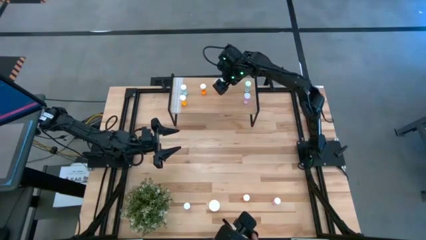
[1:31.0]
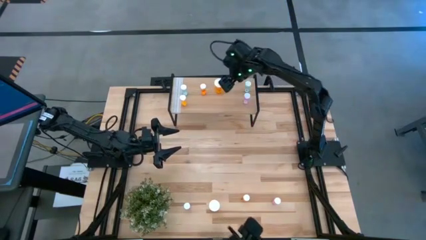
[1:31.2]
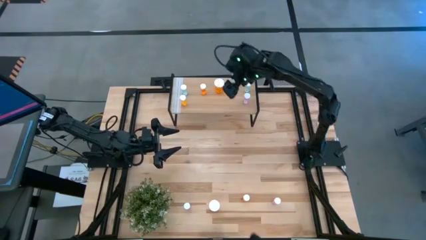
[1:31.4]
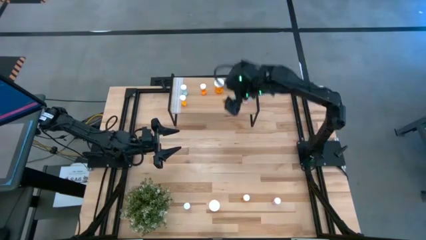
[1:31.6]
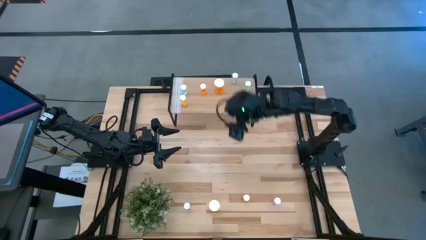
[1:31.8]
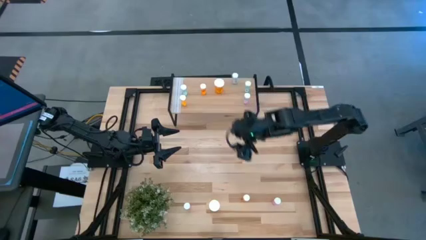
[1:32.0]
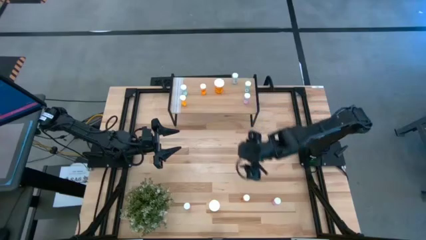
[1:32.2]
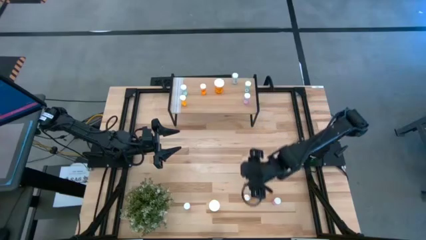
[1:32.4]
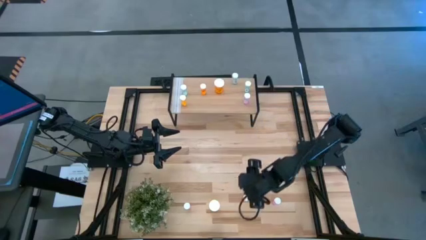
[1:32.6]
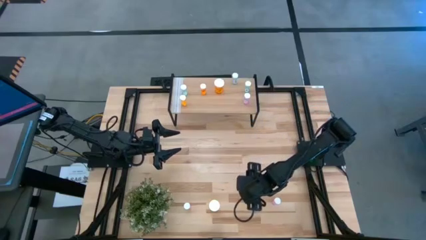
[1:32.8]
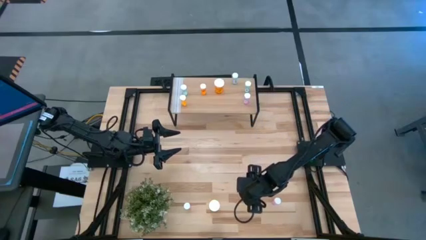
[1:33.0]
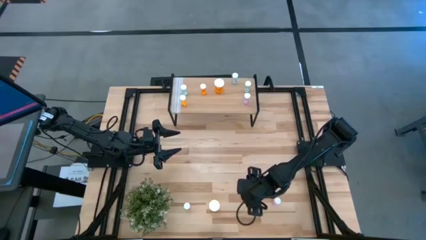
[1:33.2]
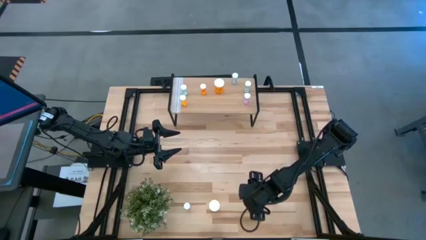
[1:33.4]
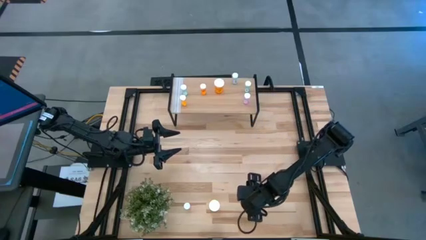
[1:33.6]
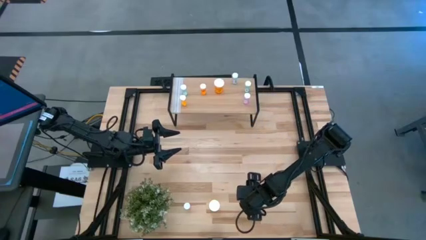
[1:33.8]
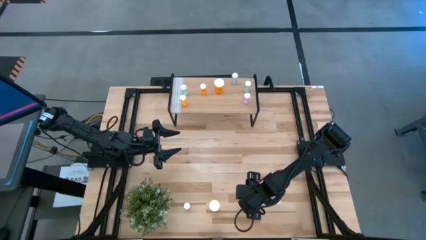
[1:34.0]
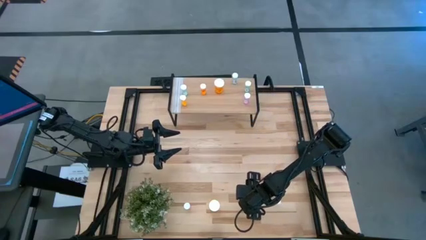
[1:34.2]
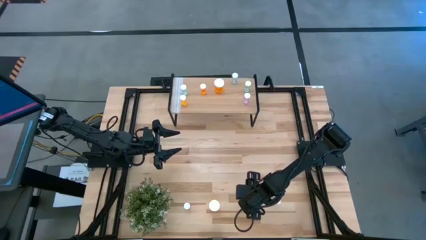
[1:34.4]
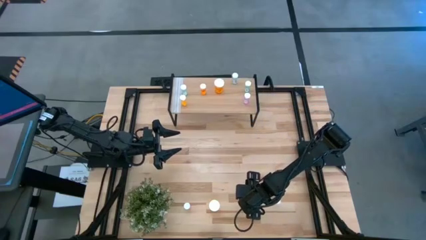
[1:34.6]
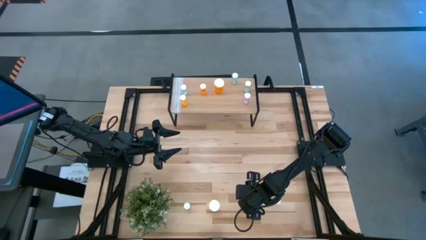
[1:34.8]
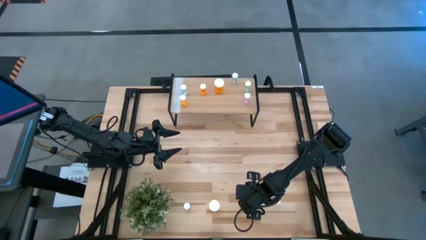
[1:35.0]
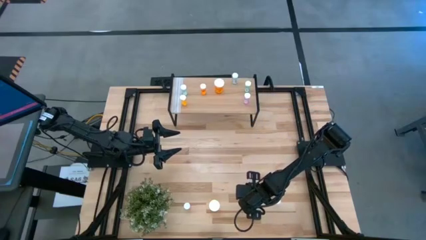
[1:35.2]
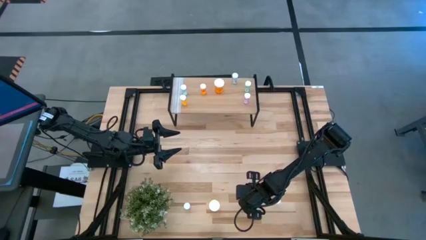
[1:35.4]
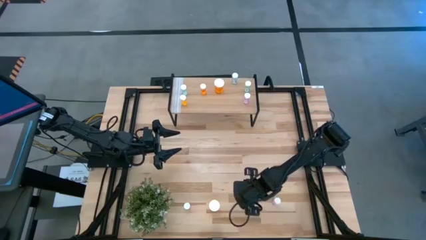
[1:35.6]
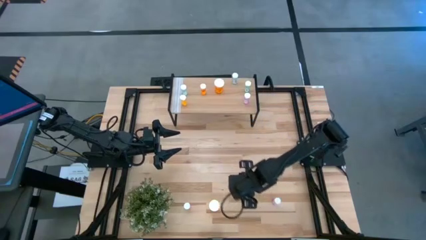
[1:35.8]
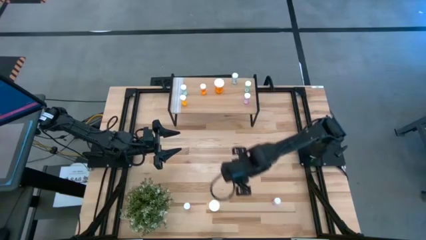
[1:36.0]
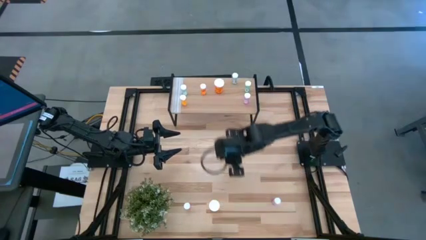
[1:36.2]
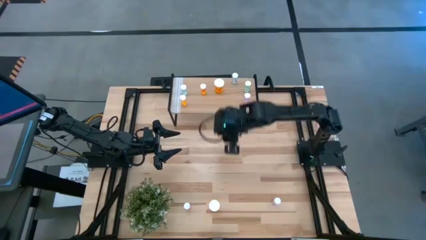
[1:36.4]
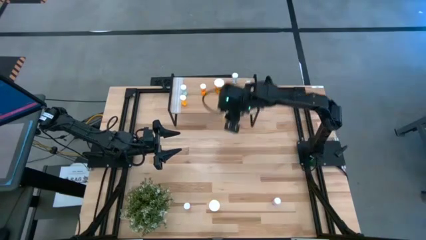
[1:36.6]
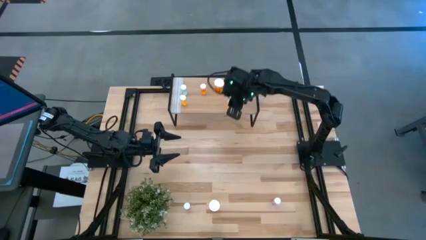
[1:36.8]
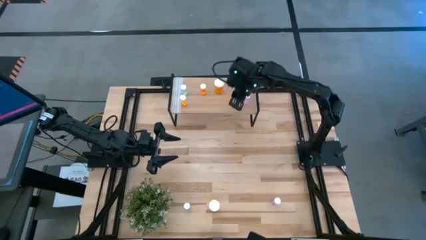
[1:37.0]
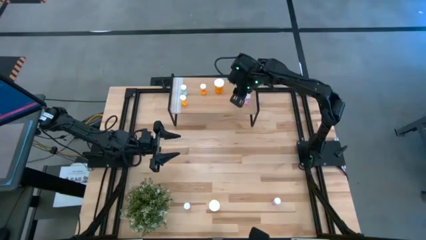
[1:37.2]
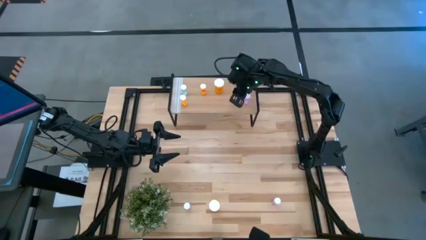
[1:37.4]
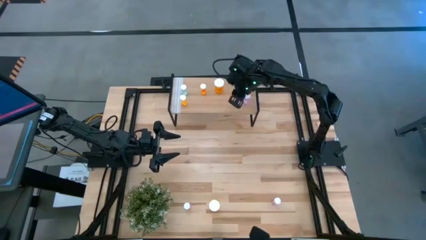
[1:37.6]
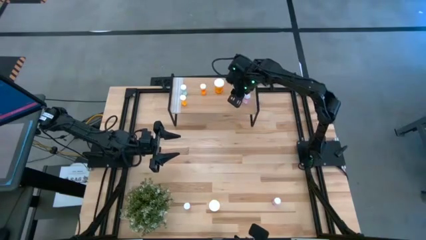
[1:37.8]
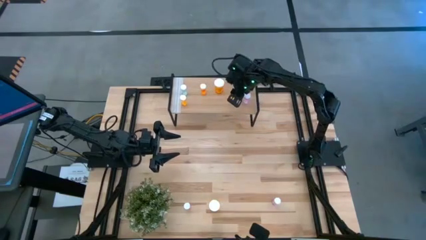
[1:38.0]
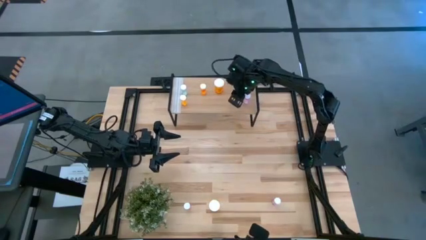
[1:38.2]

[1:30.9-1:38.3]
Task: Pick and place medicine bottles onto shelf by color
Put the small orange bottle on the shelf

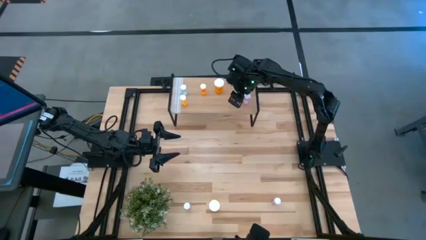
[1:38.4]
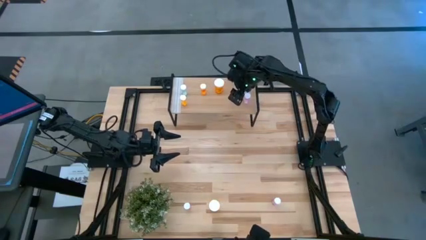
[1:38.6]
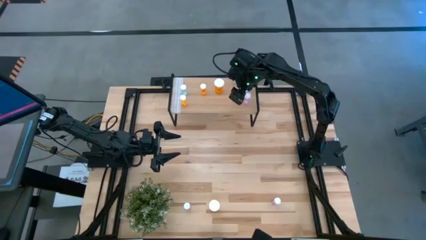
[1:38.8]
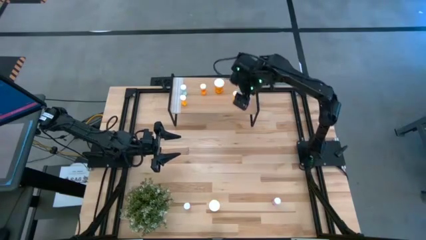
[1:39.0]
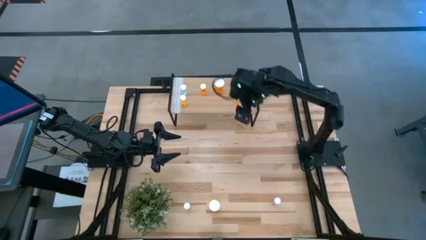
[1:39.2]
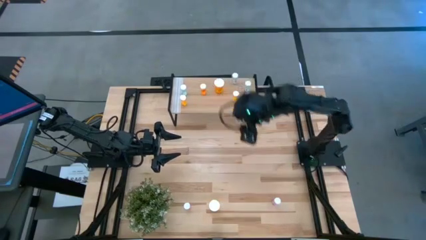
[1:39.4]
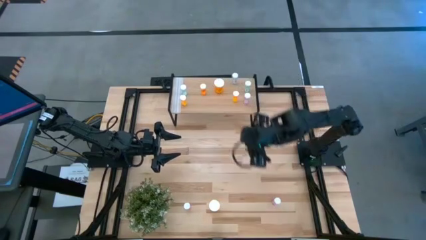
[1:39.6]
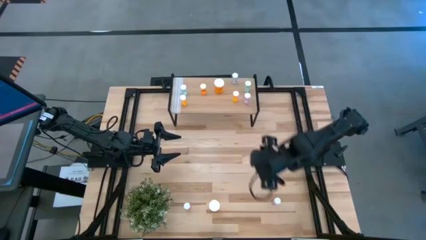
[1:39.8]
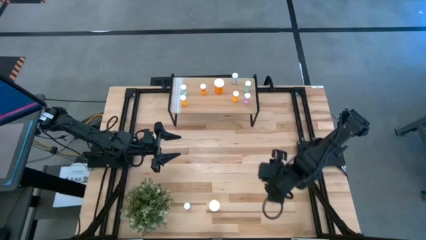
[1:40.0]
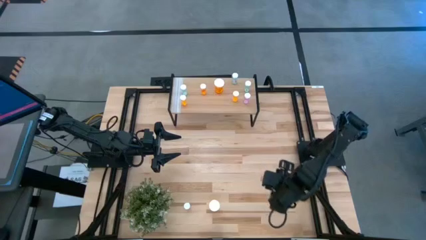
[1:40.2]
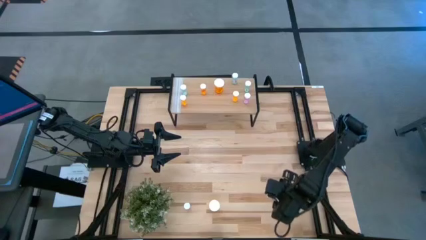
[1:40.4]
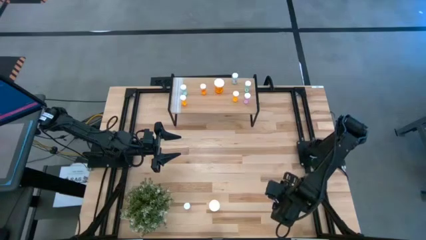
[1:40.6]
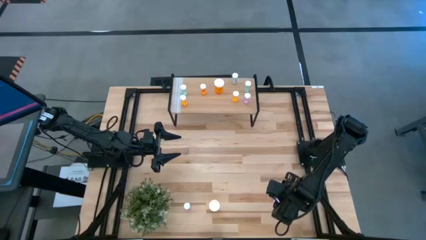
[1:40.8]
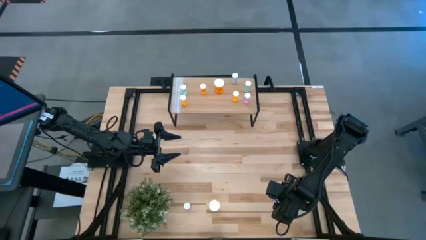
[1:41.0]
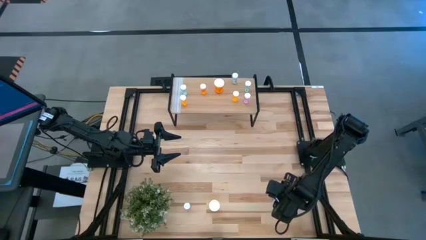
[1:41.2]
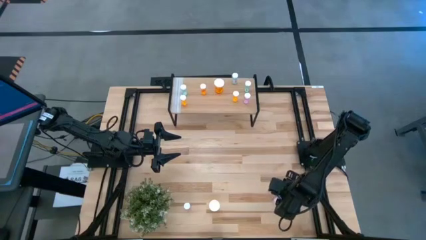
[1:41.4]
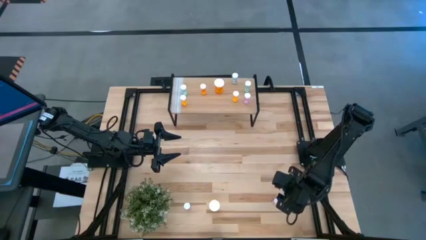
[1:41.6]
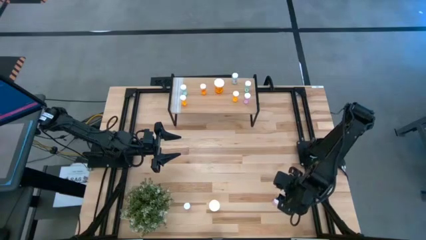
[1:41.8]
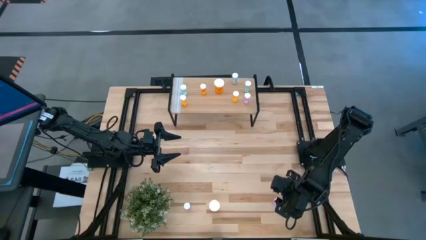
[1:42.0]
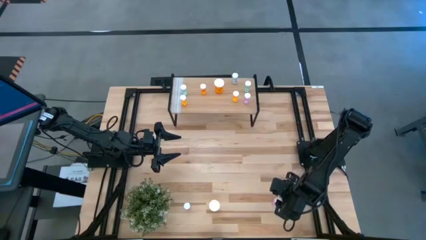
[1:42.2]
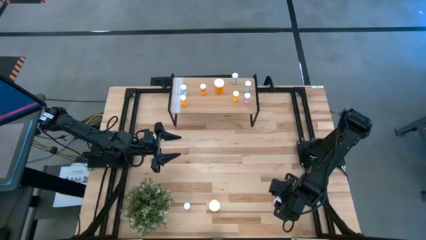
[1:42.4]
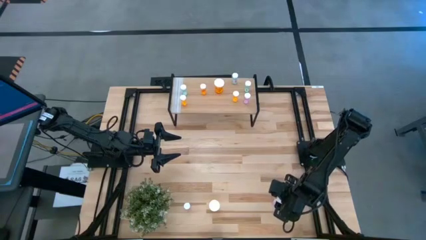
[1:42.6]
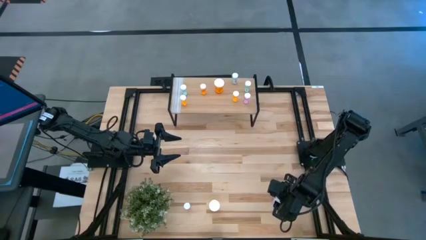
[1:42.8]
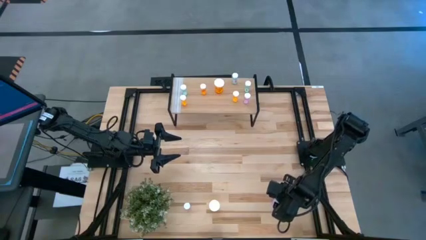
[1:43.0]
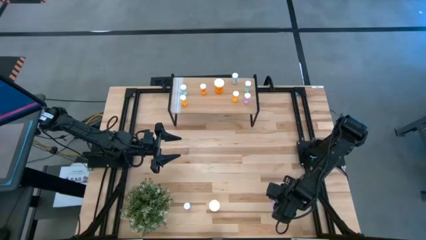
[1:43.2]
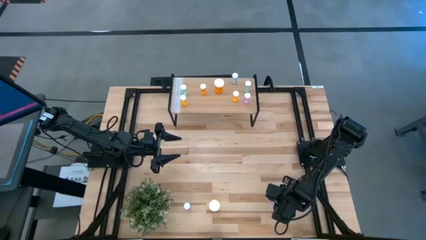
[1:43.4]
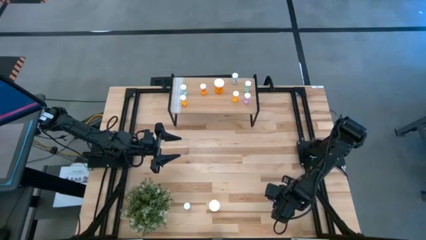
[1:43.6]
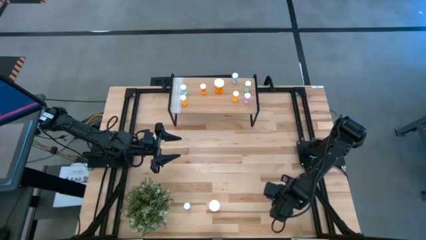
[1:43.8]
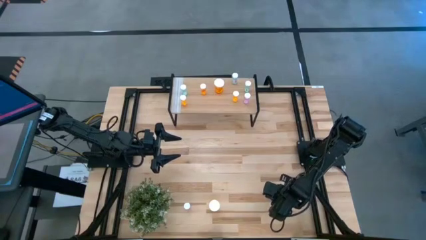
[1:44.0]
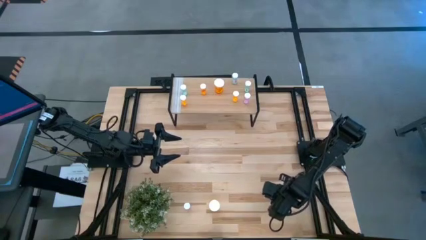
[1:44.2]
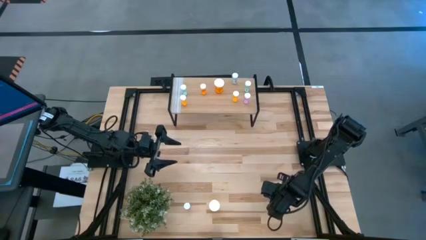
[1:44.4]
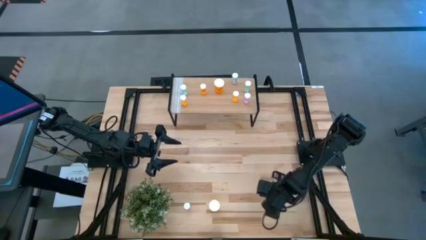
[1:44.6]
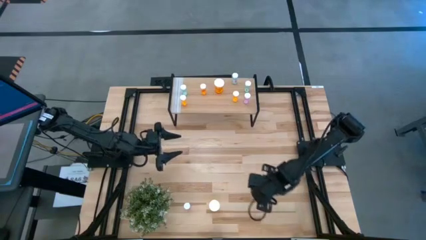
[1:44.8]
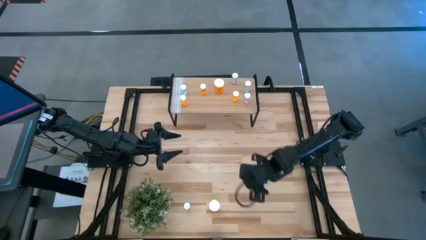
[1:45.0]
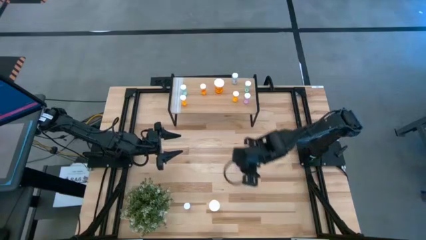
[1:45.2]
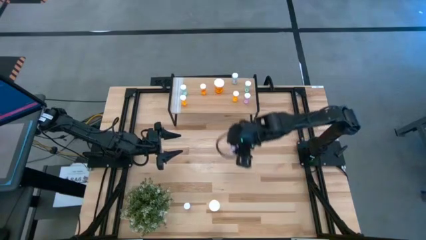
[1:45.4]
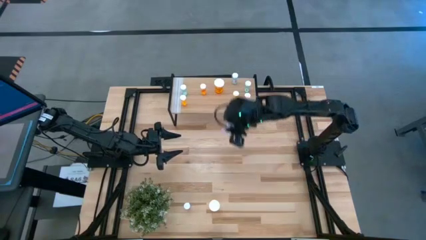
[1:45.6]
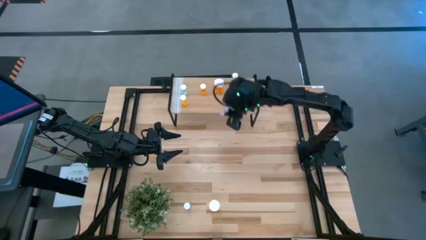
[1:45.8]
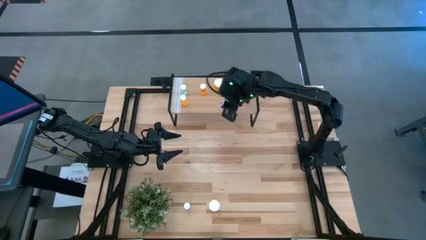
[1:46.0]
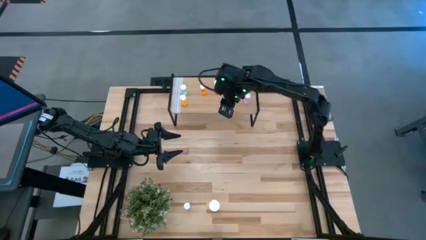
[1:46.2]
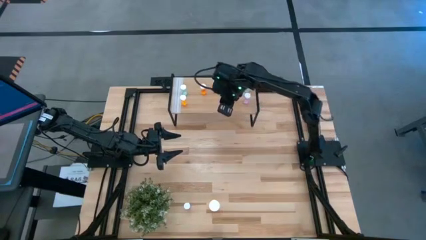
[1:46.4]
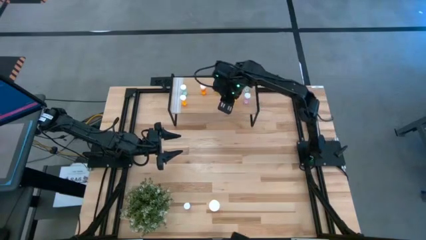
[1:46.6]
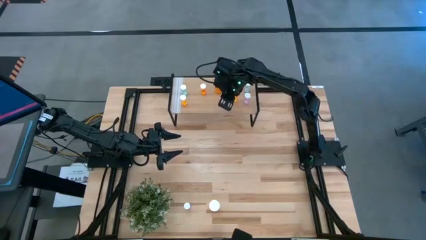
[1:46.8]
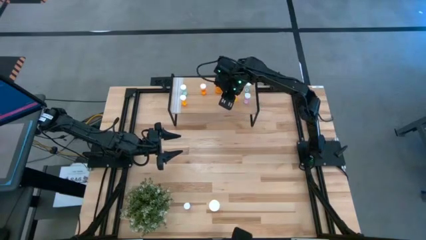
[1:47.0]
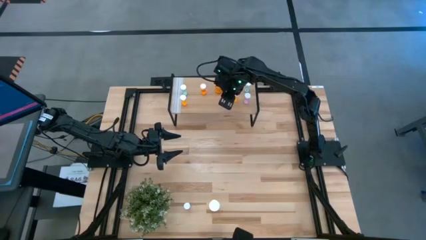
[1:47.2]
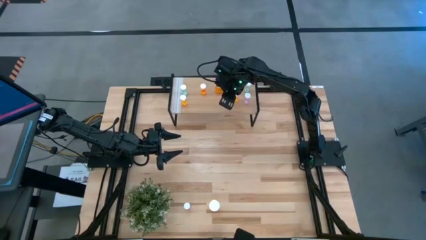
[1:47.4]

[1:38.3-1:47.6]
Put the small right violet bottle on the shelf
